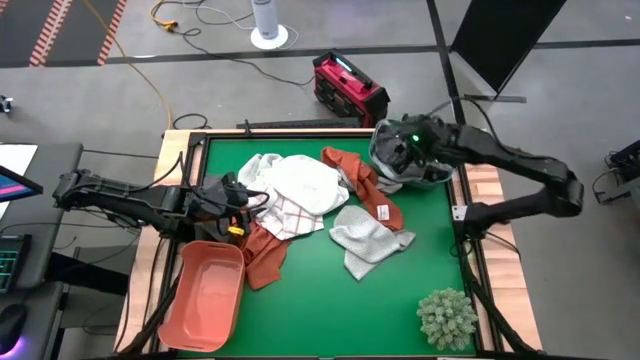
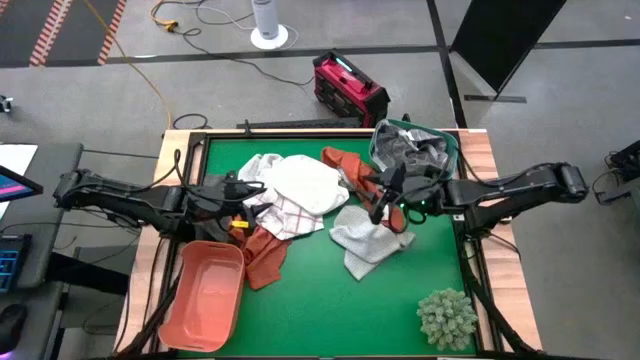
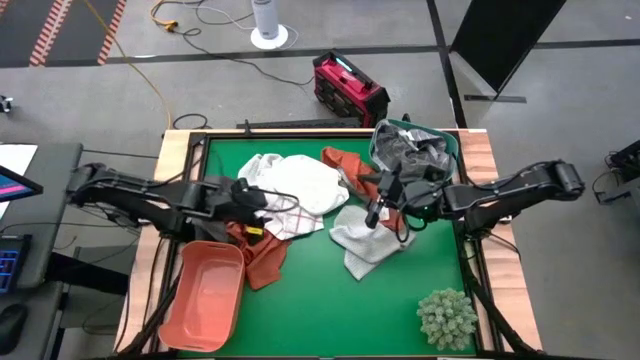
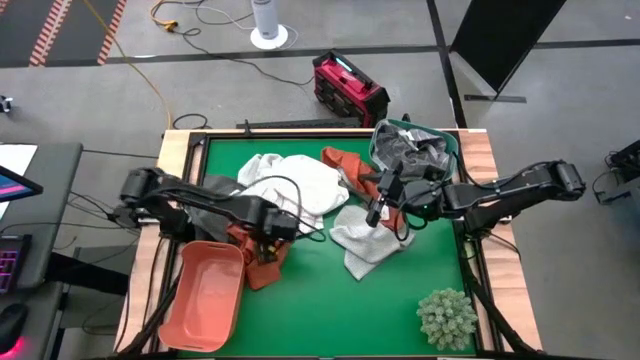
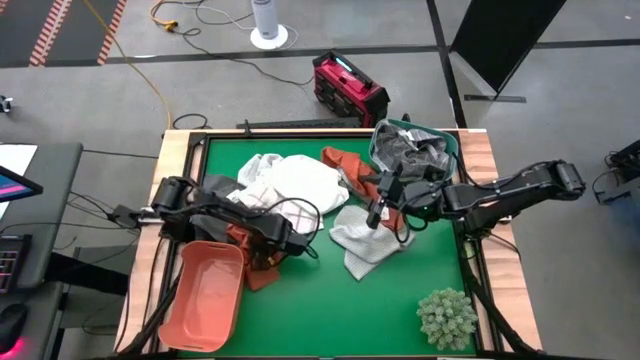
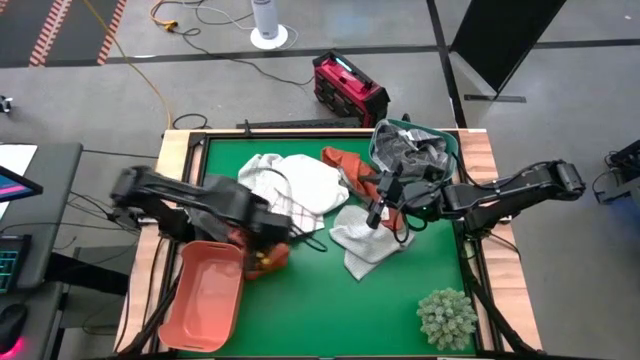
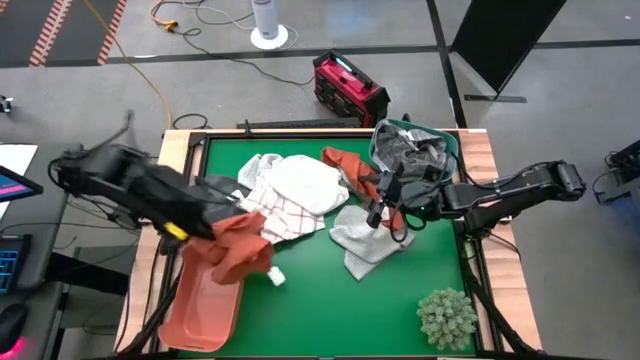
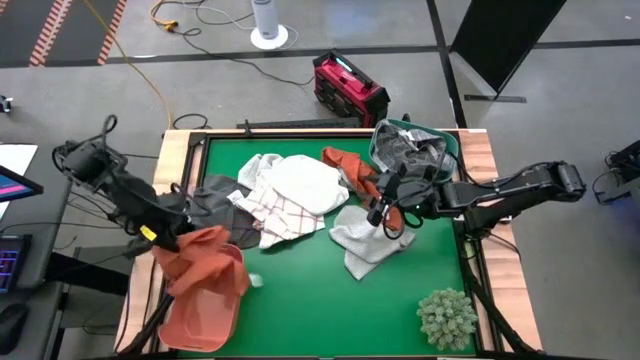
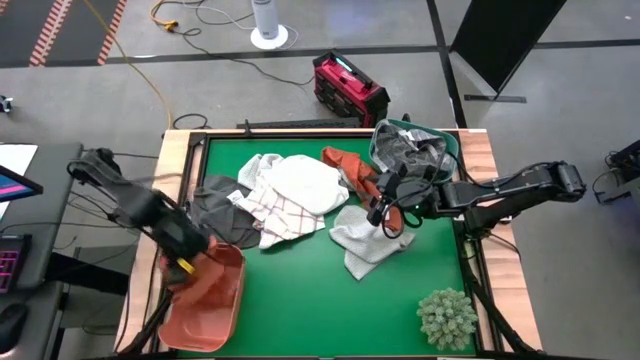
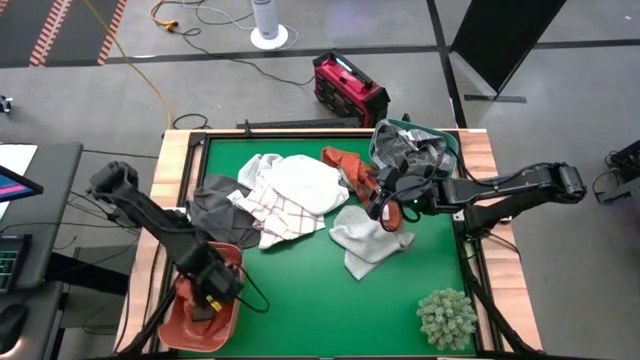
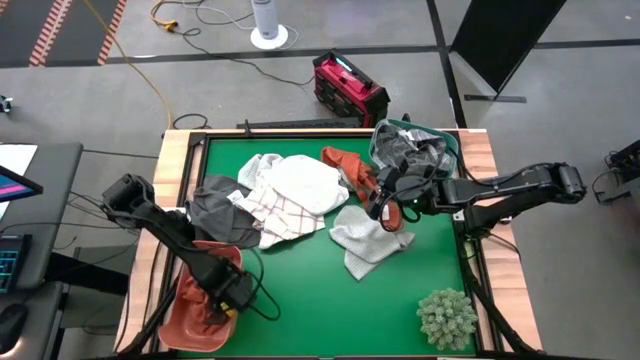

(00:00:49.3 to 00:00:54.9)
Task: Sort towels by color in basket
Put the bottom orange towel into the orange bin

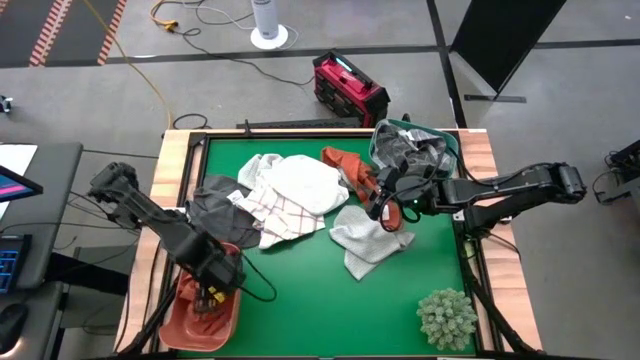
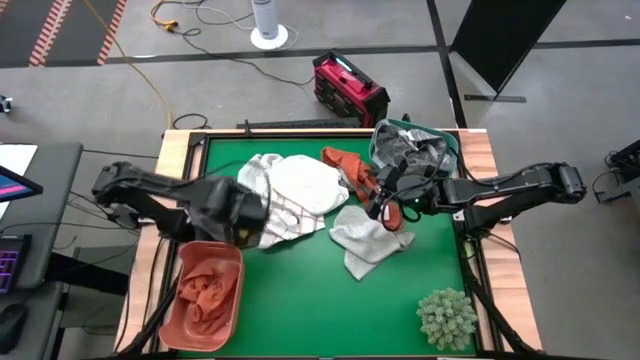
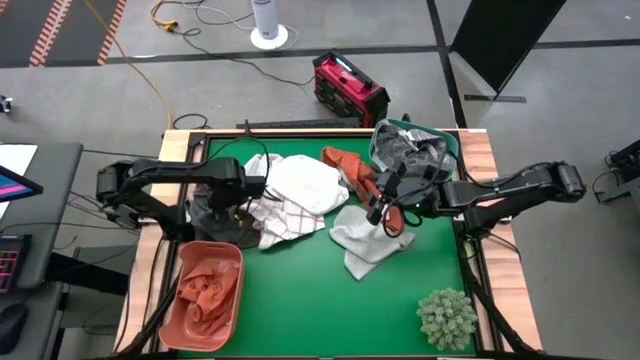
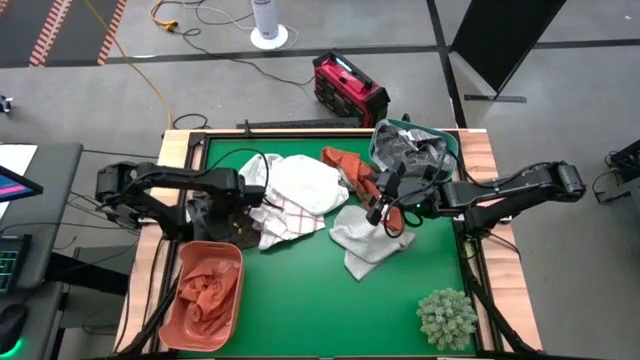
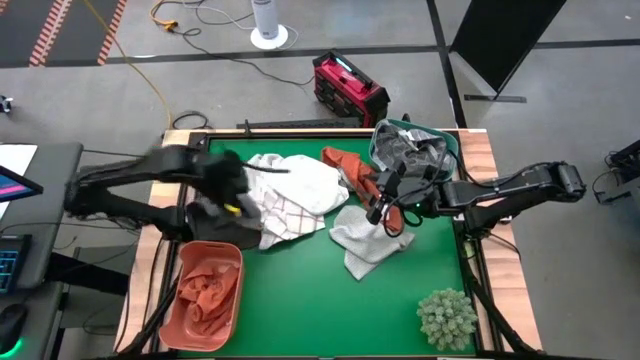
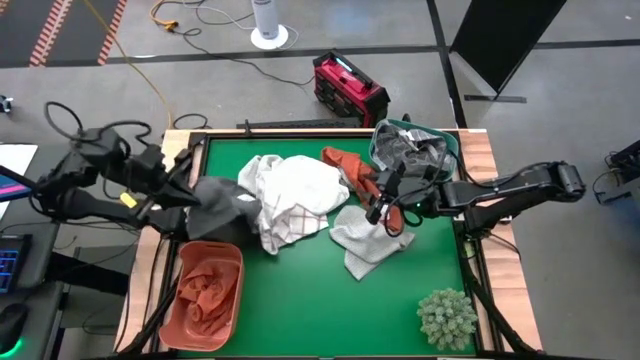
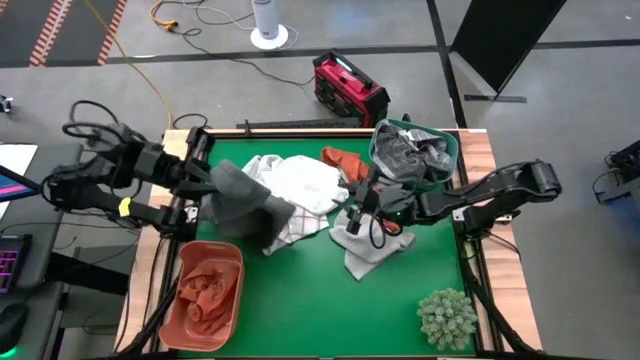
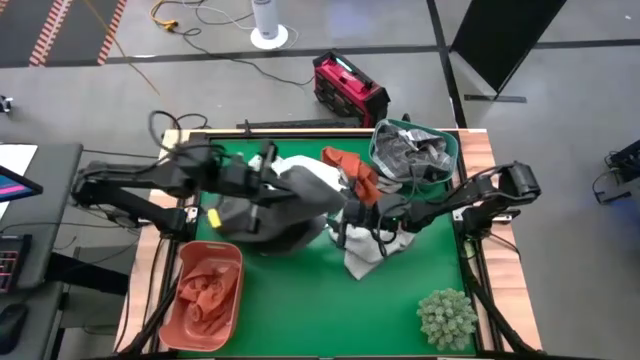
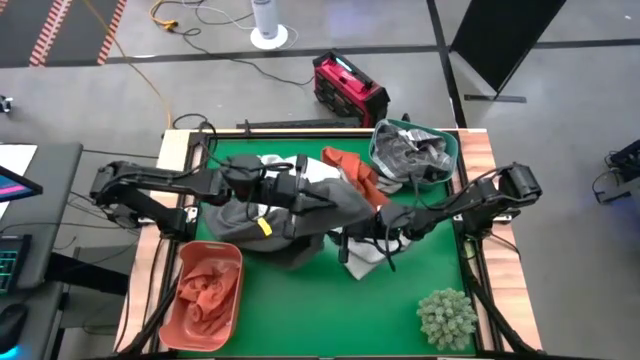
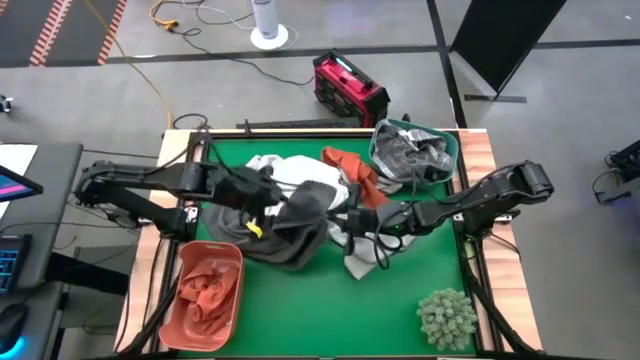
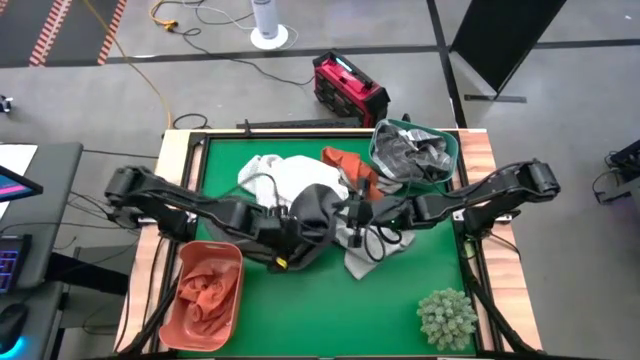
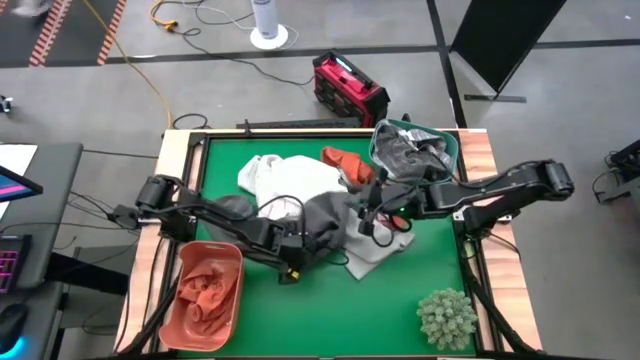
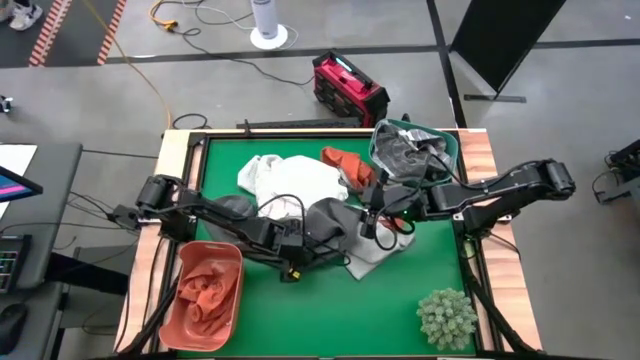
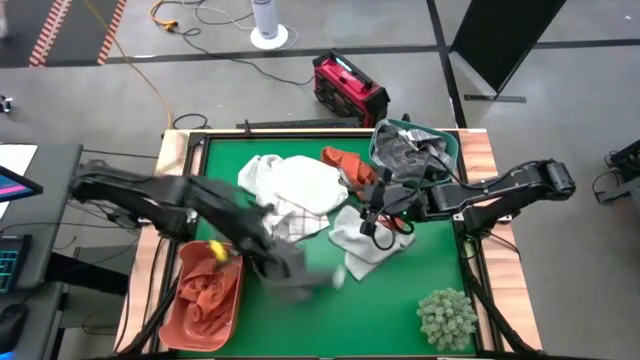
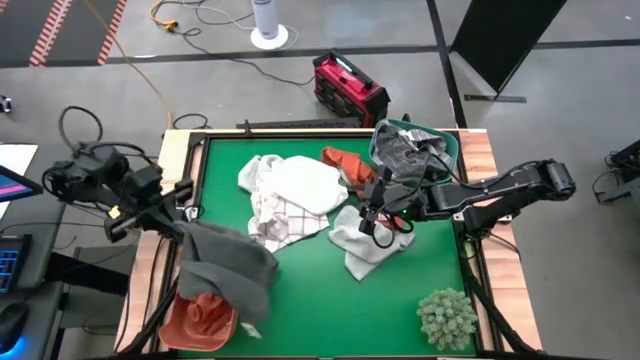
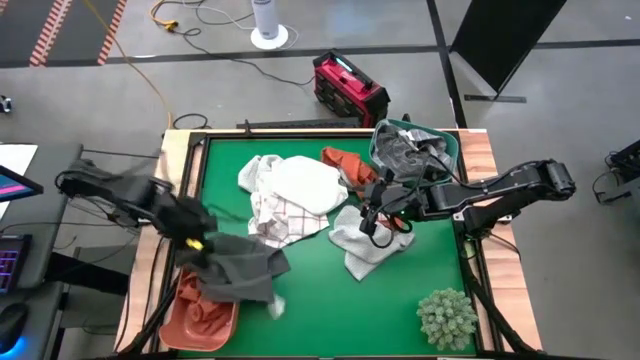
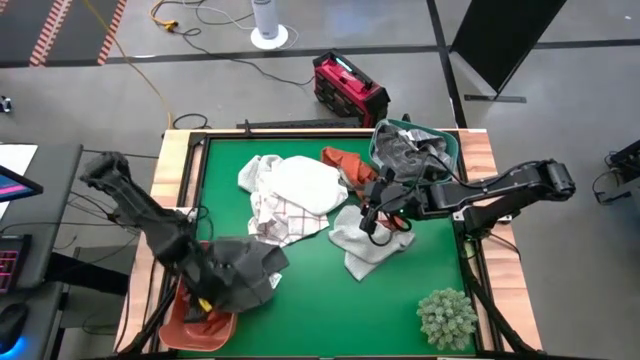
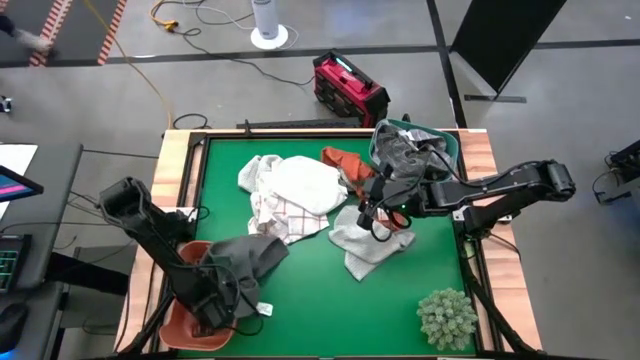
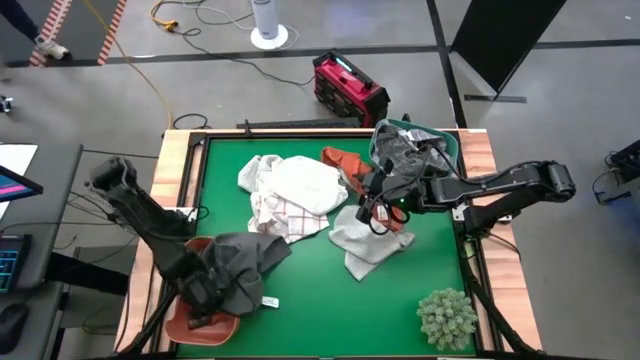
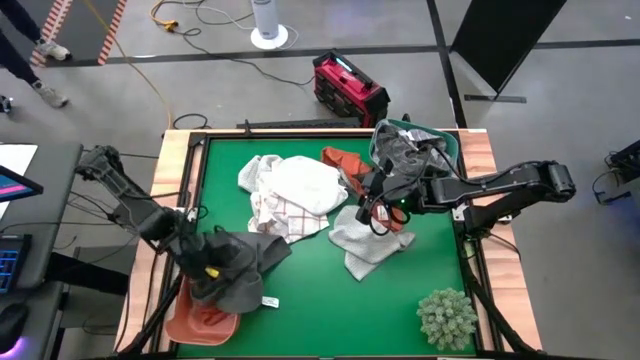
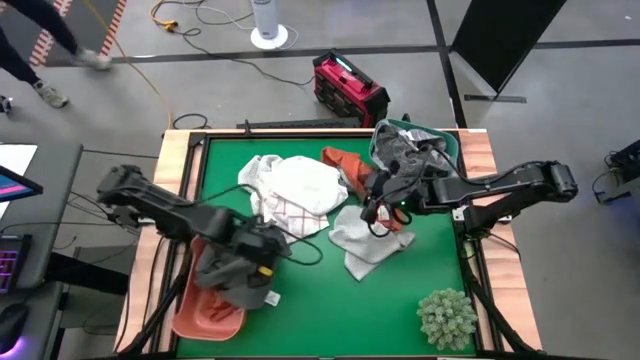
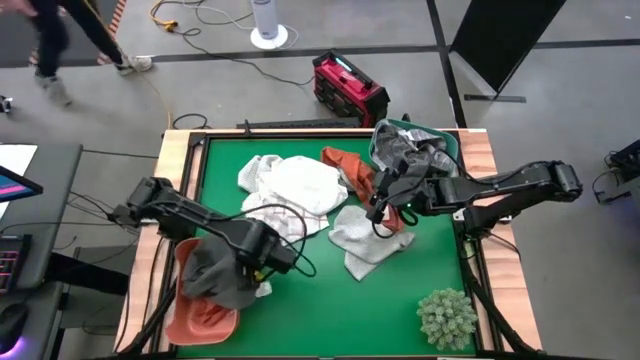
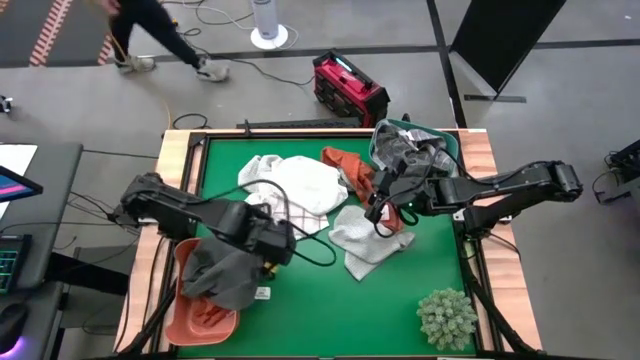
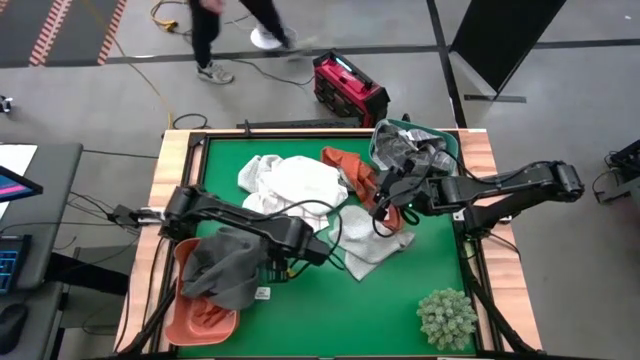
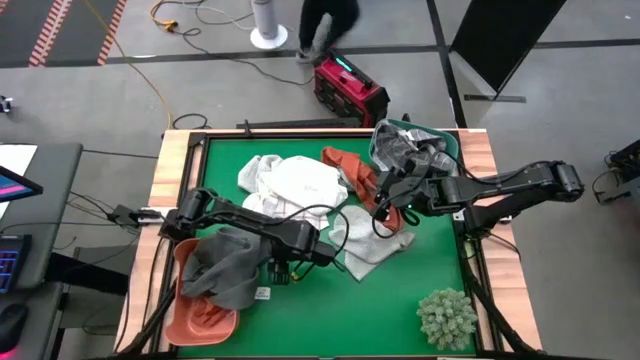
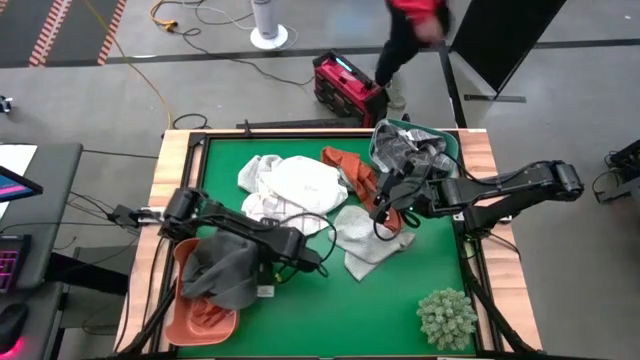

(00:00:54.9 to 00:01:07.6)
Put the gray towel into the orange bin
